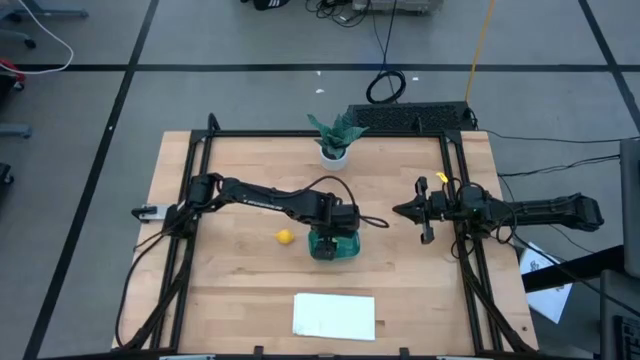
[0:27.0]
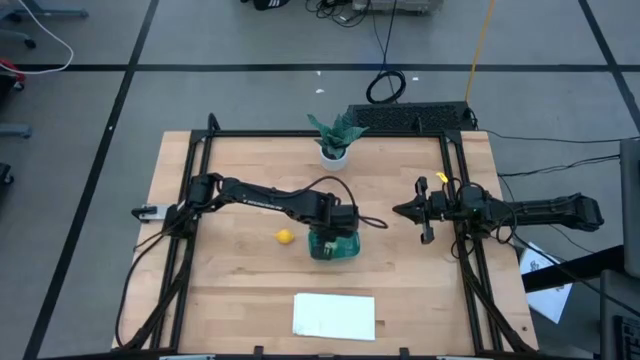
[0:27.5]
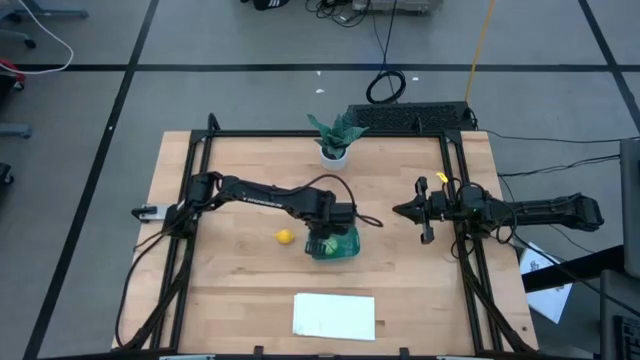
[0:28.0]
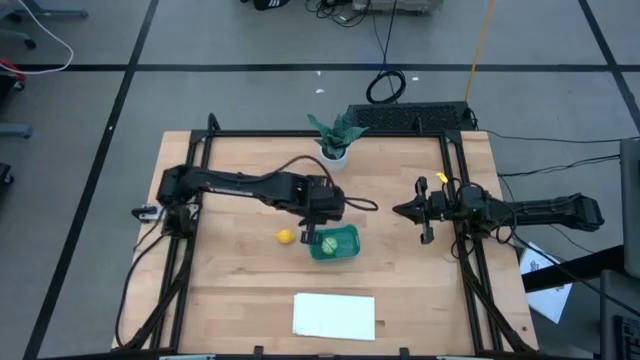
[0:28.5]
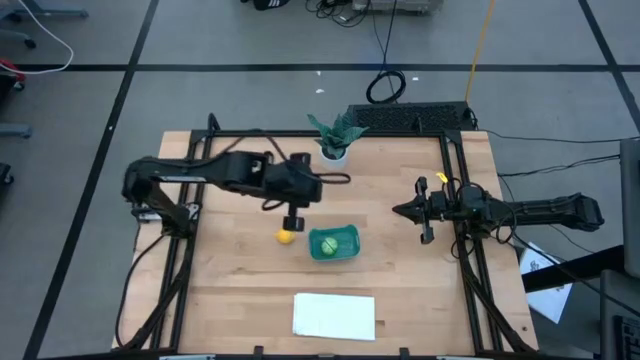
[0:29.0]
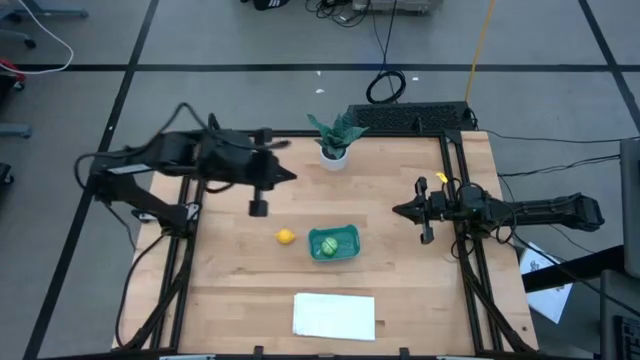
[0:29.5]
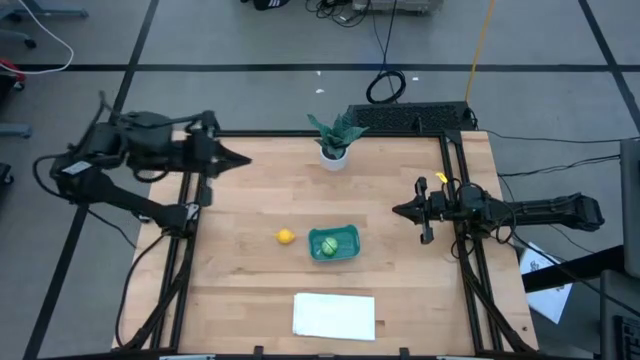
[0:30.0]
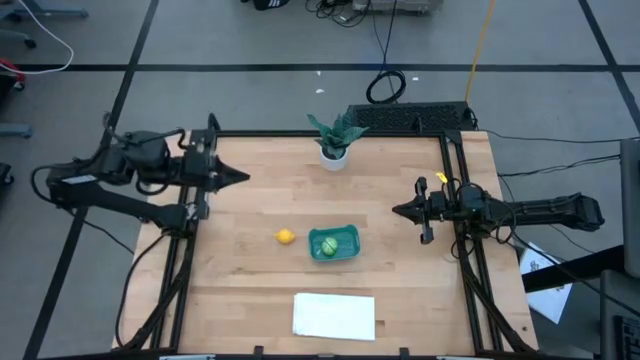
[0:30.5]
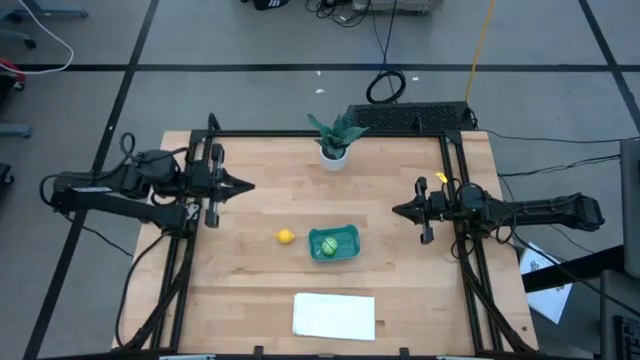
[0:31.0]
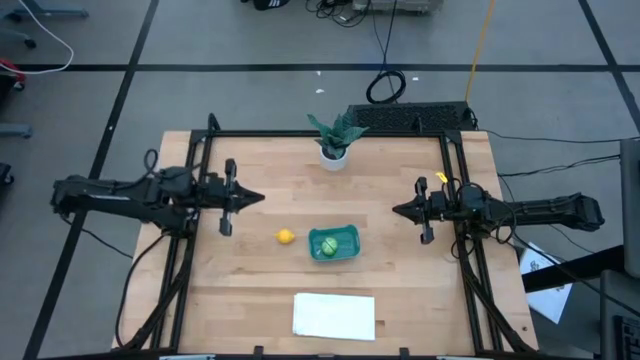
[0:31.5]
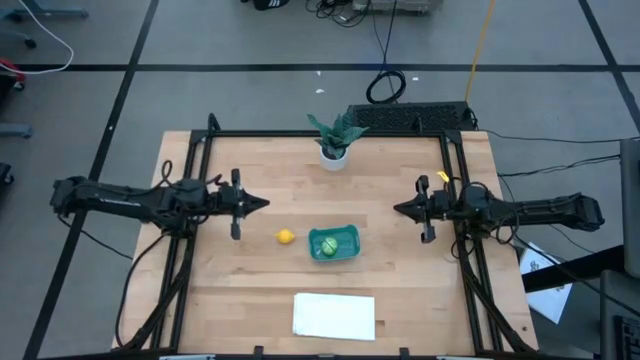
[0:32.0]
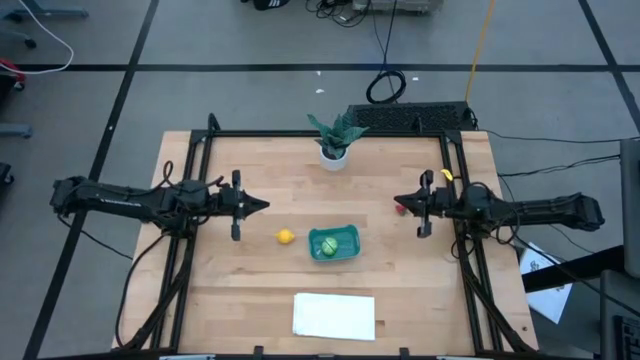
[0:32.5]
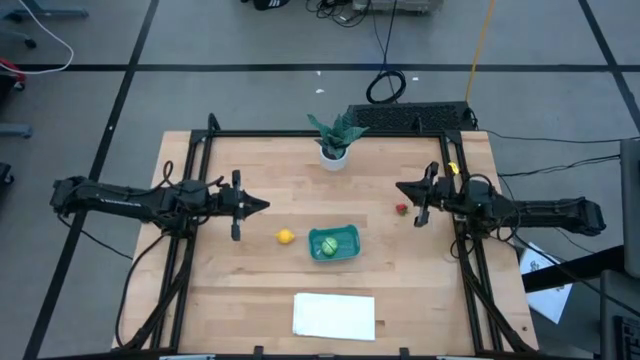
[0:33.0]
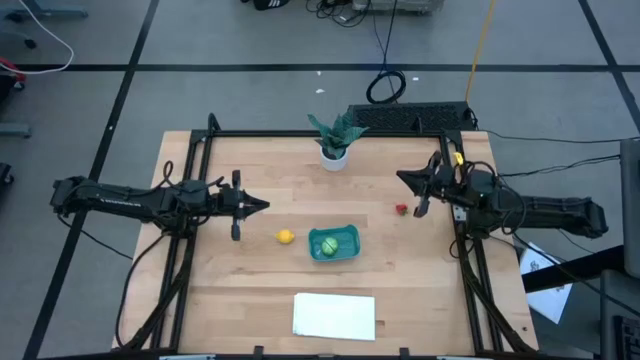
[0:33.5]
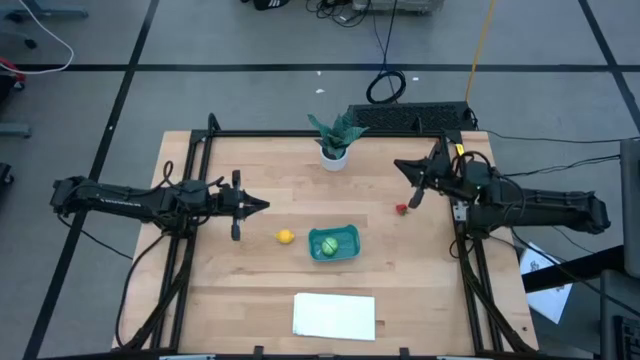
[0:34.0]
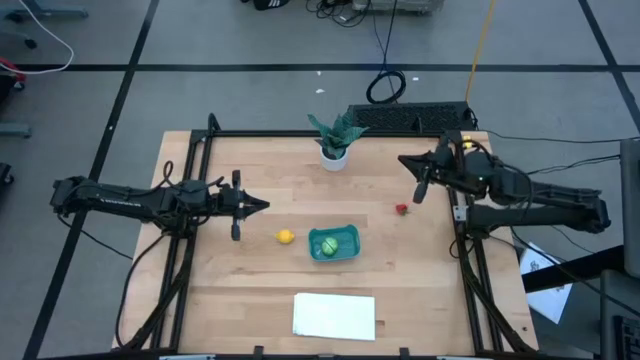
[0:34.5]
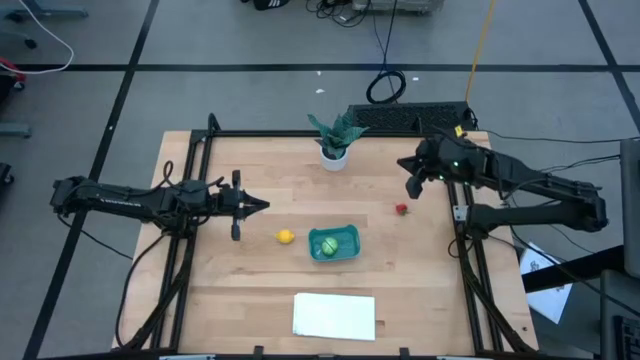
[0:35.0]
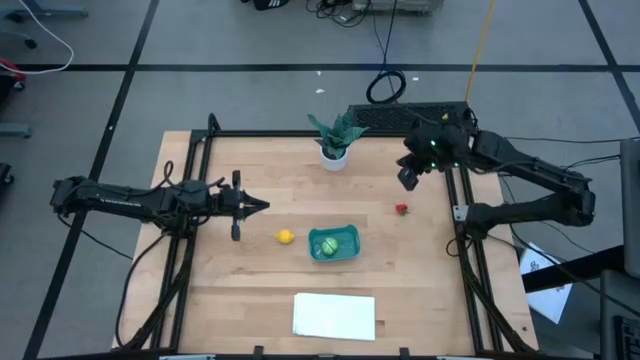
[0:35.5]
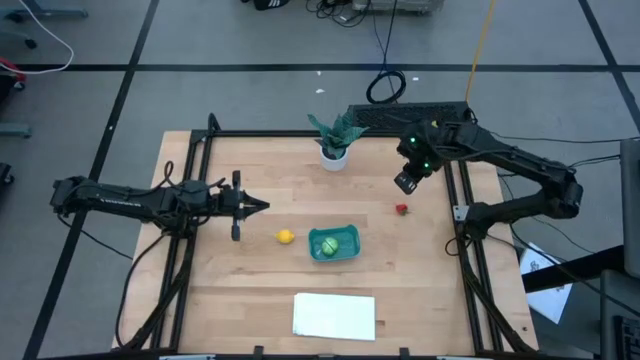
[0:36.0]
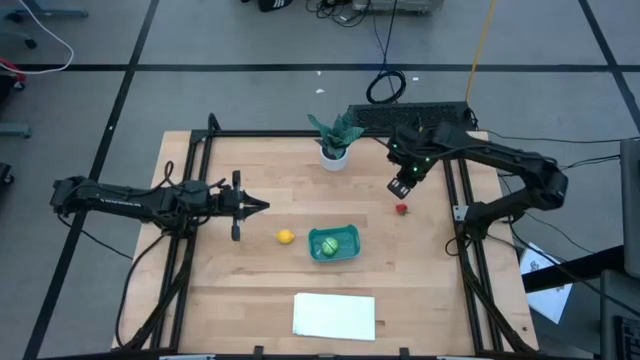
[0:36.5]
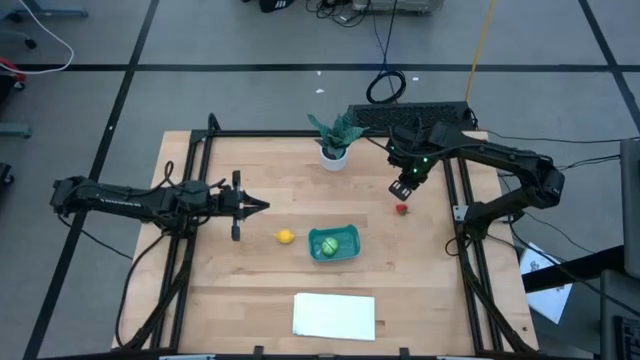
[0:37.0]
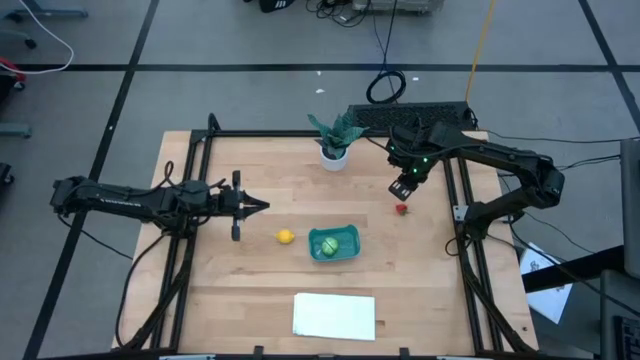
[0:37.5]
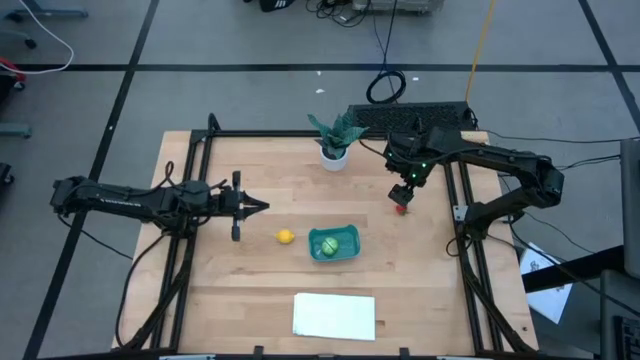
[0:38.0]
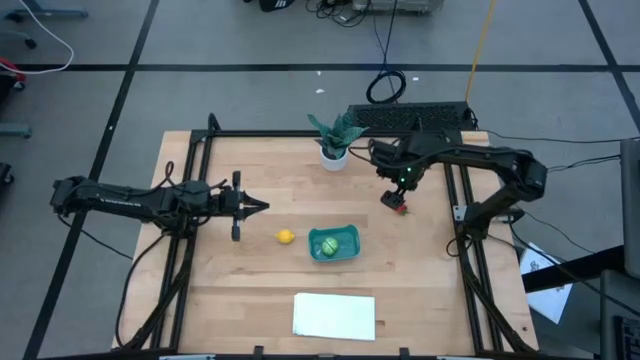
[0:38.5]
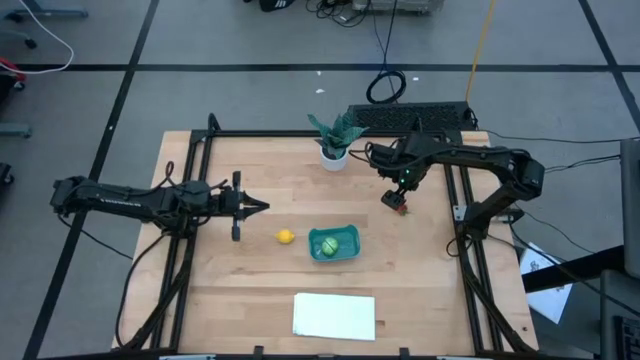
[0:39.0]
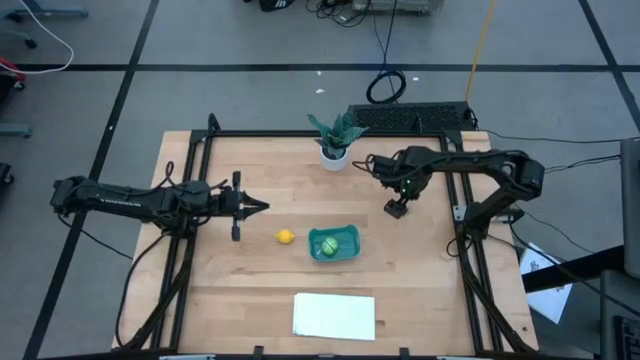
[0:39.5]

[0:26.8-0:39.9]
Task: Pick and placing Produce into tupperware
Put the strawberry into the green bin
